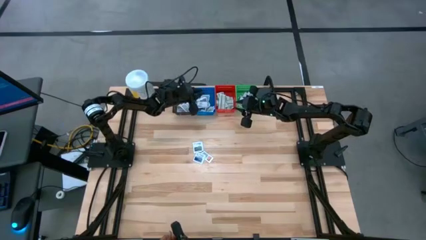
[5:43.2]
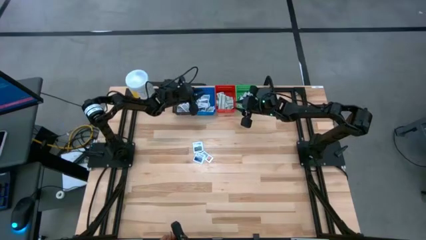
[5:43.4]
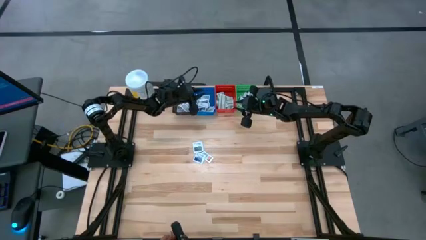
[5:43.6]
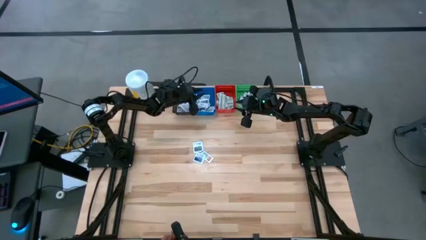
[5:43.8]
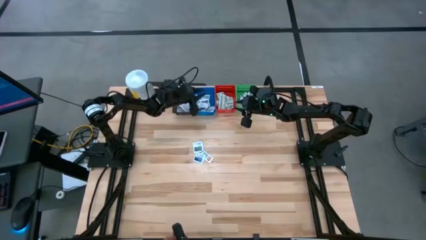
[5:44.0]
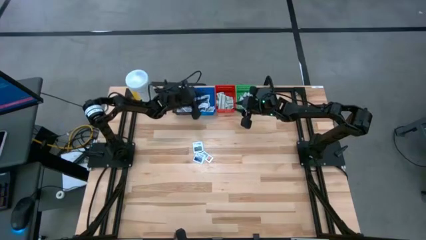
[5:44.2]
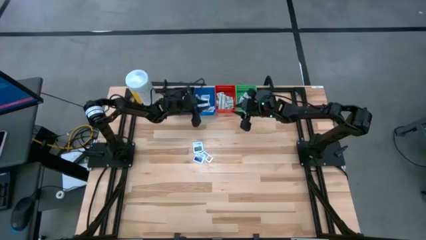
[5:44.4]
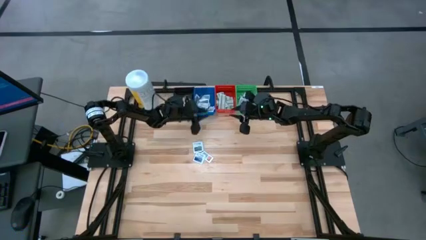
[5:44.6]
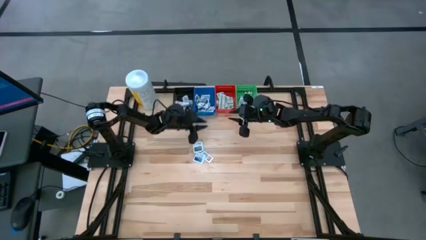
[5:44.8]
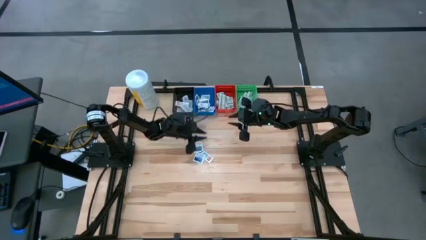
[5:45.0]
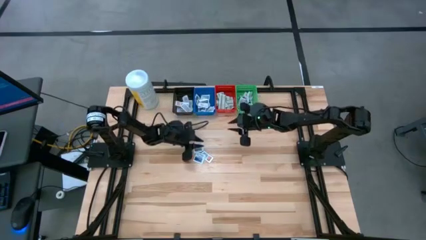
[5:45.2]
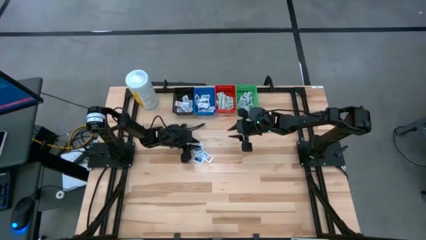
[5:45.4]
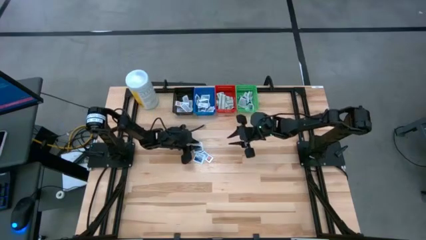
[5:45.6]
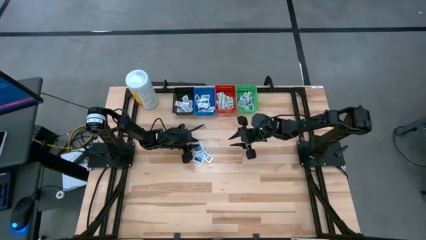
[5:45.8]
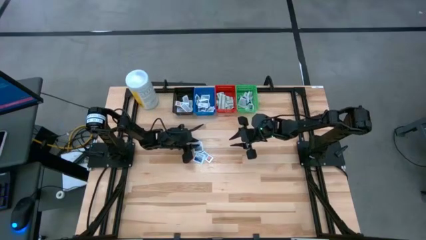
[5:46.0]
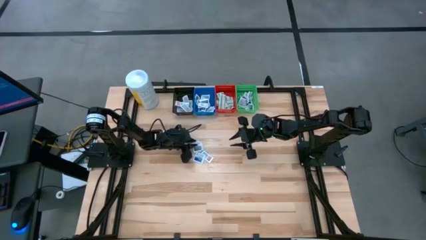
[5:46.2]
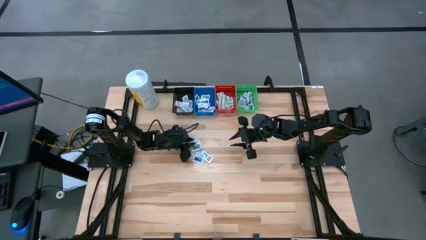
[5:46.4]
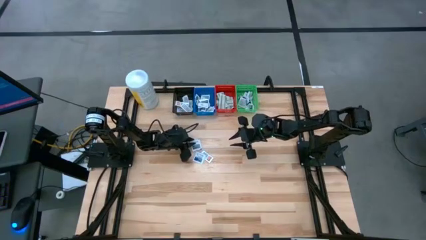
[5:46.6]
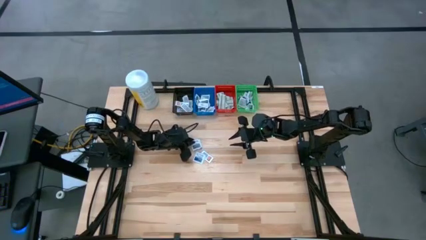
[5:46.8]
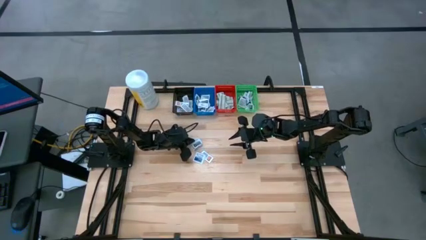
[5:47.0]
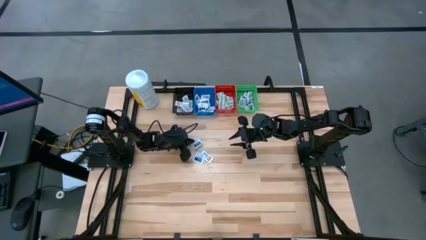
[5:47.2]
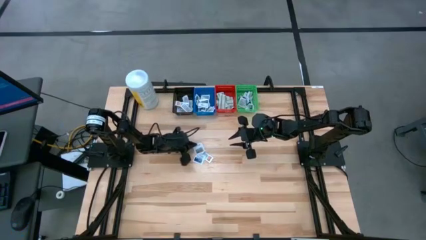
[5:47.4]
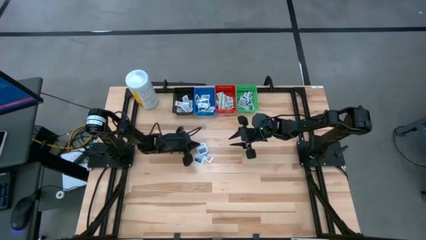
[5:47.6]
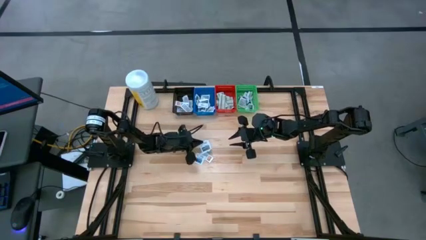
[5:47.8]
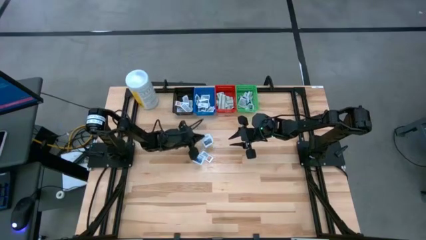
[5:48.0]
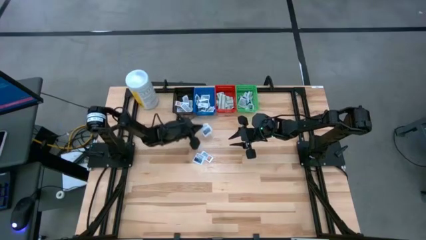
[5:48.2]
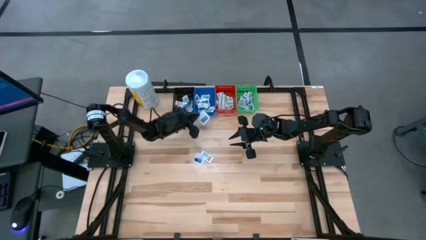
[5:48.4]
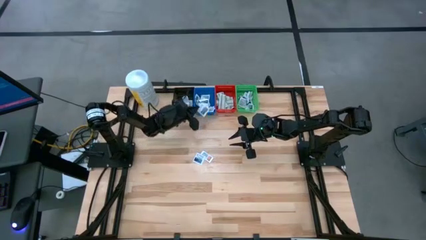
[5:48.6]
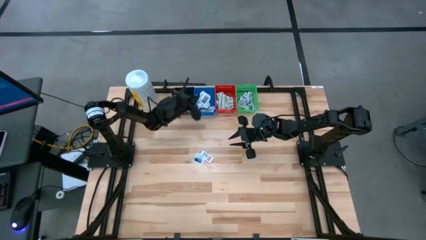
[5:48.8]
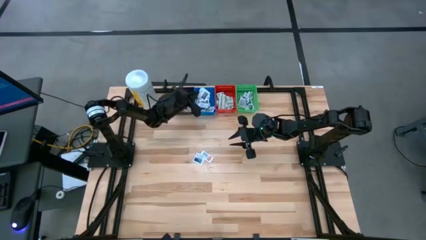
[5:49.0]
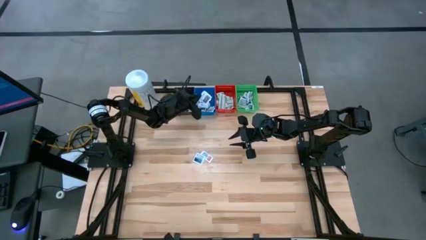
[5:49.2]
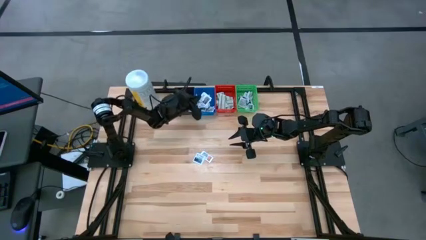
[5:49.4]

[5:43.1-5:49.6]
Task: Pick & Place First Aid Supplies
Put the gray towelette pack into the blue bin

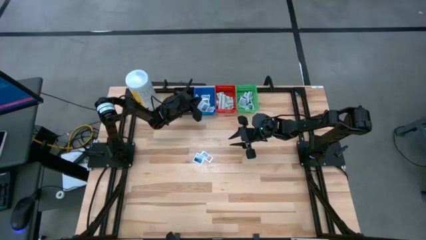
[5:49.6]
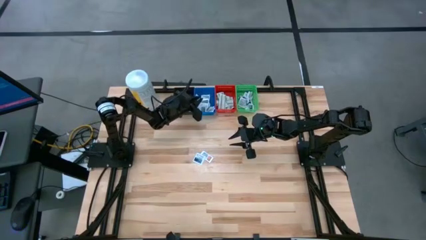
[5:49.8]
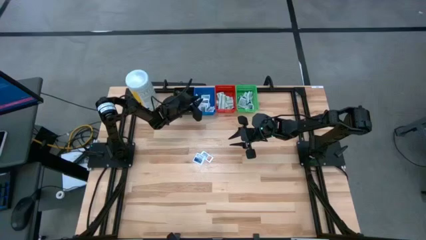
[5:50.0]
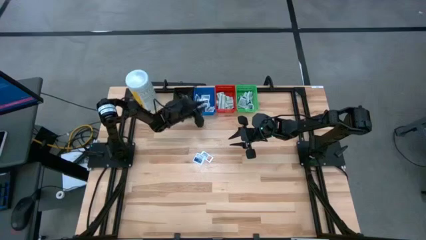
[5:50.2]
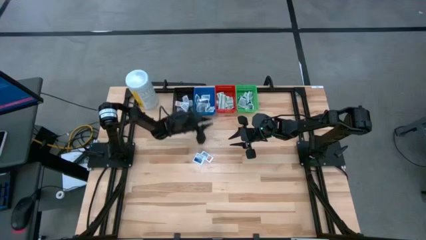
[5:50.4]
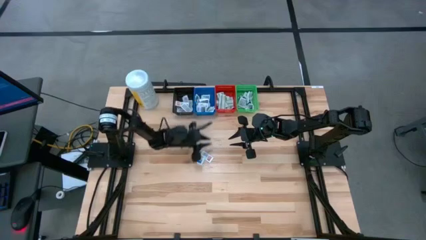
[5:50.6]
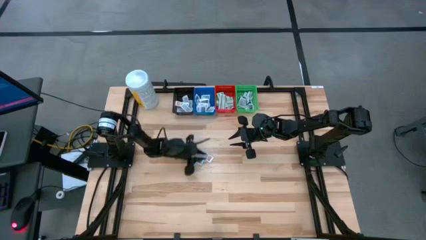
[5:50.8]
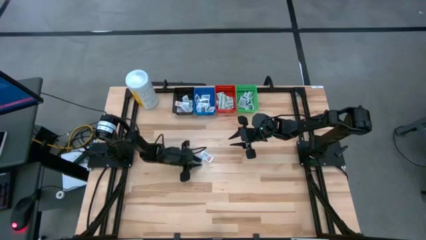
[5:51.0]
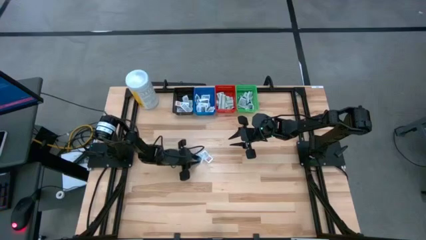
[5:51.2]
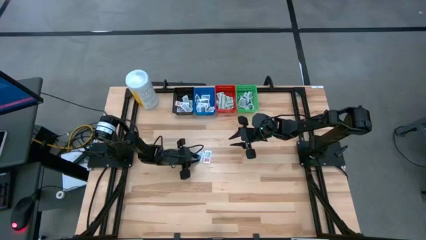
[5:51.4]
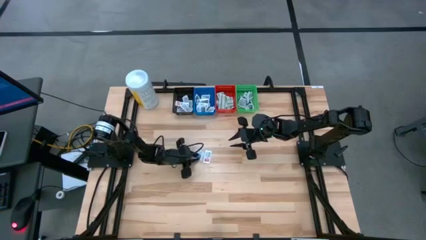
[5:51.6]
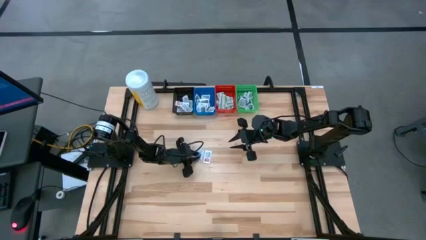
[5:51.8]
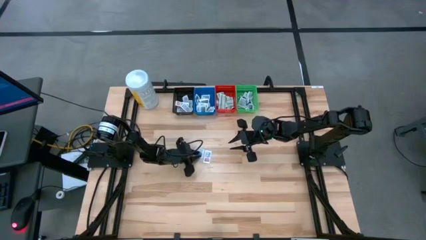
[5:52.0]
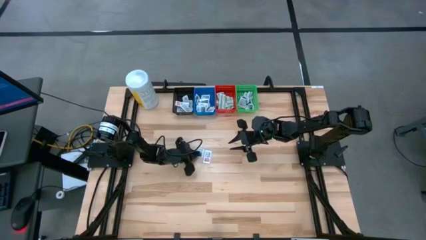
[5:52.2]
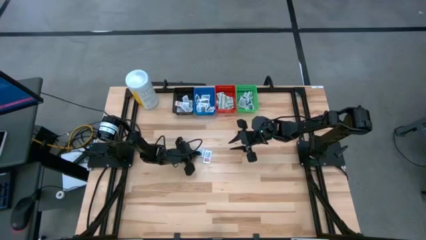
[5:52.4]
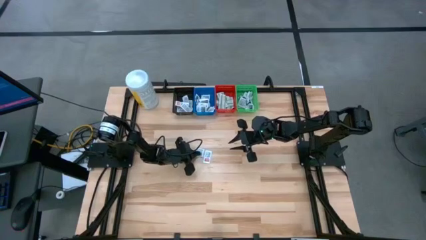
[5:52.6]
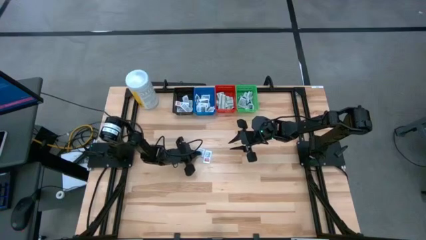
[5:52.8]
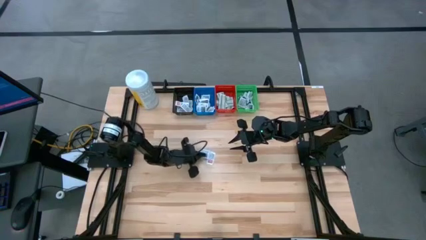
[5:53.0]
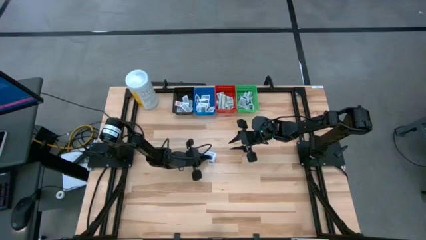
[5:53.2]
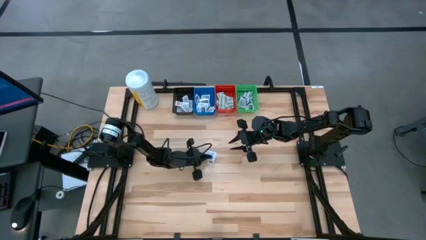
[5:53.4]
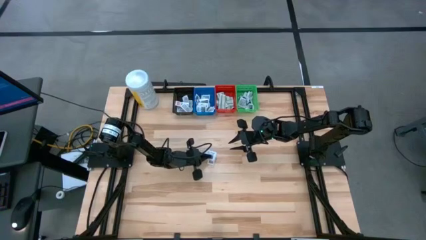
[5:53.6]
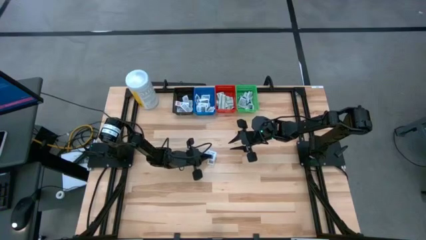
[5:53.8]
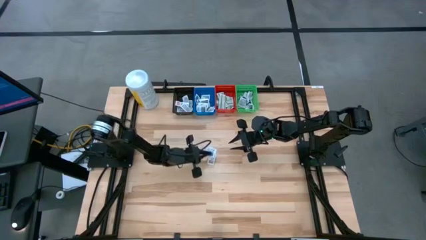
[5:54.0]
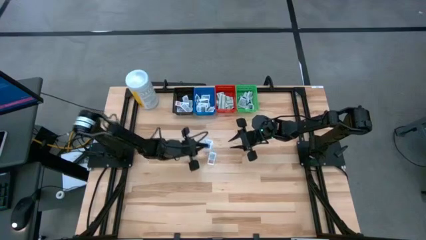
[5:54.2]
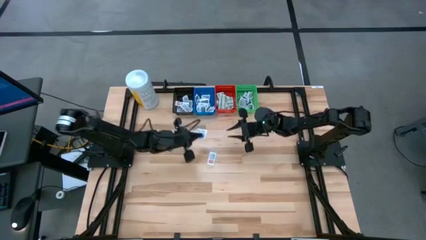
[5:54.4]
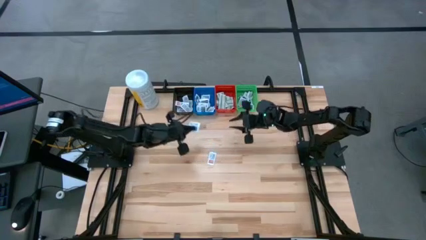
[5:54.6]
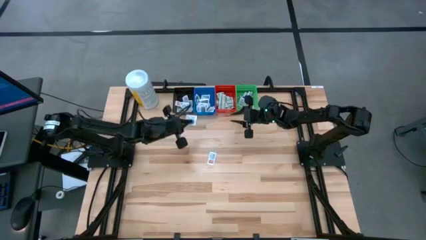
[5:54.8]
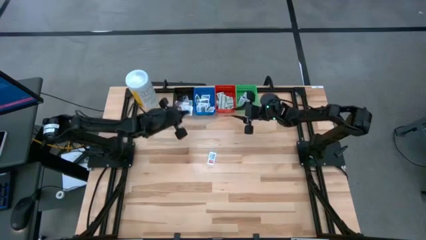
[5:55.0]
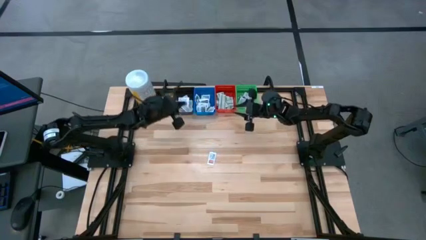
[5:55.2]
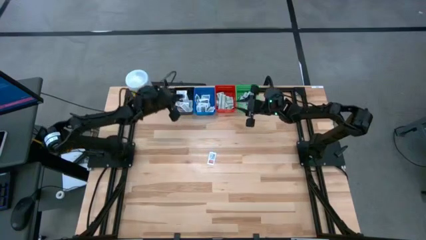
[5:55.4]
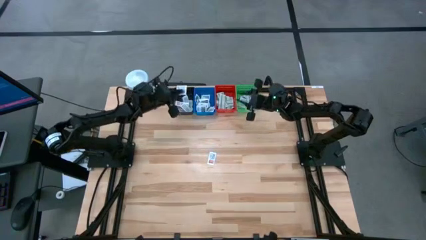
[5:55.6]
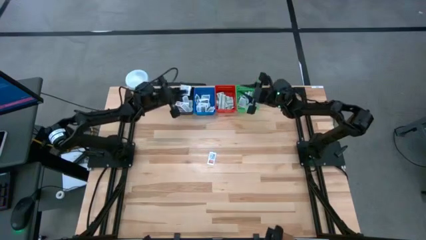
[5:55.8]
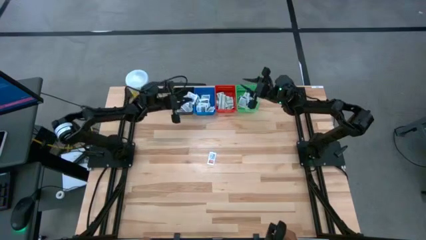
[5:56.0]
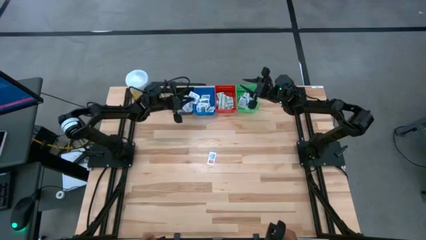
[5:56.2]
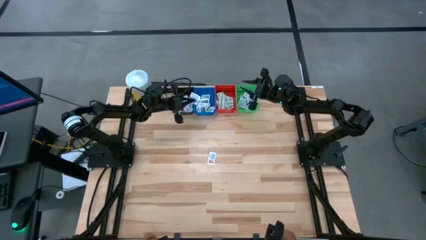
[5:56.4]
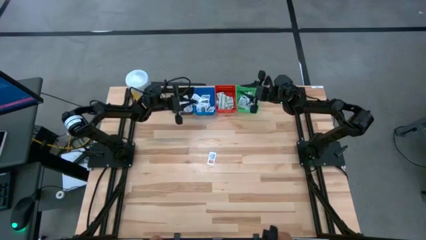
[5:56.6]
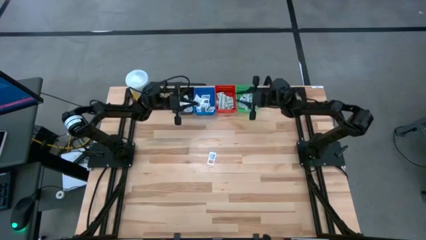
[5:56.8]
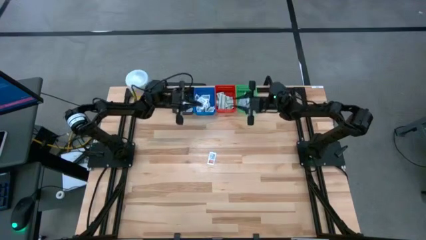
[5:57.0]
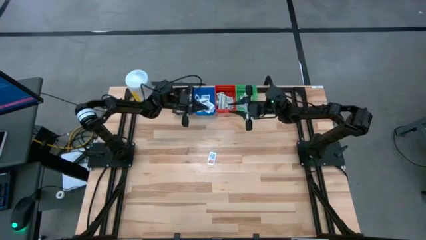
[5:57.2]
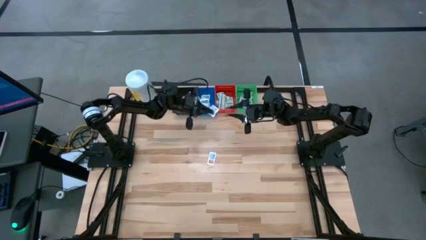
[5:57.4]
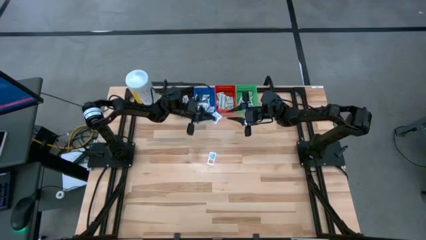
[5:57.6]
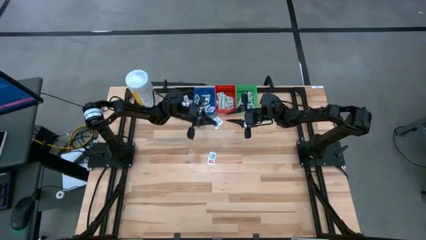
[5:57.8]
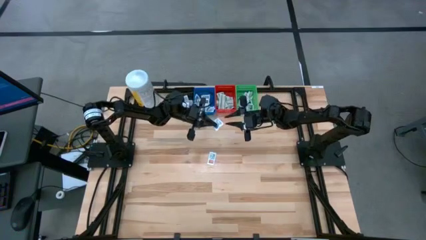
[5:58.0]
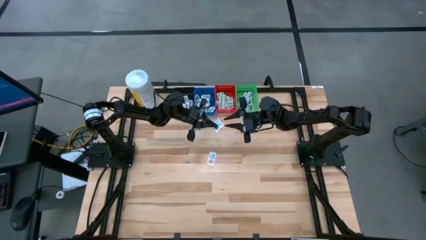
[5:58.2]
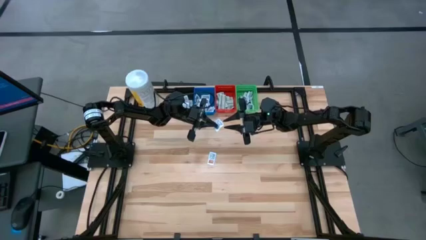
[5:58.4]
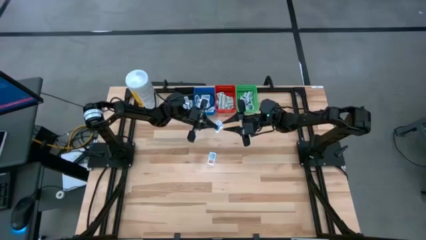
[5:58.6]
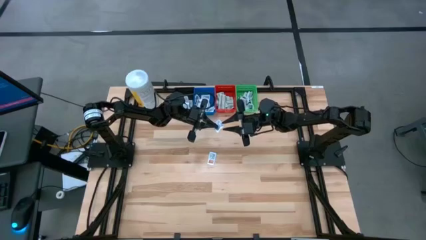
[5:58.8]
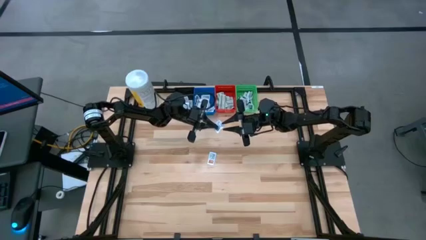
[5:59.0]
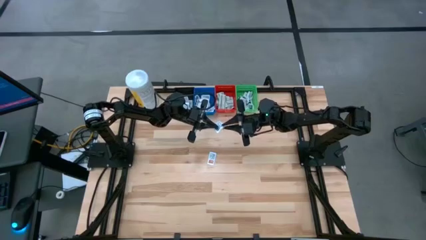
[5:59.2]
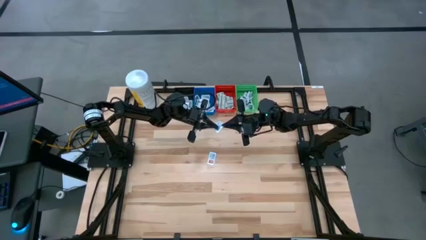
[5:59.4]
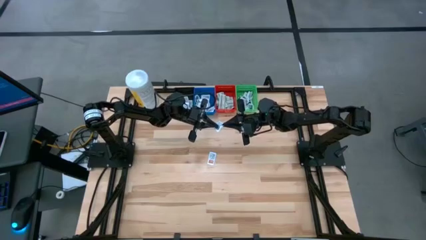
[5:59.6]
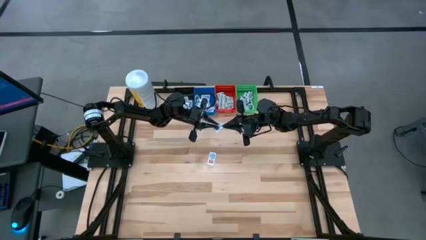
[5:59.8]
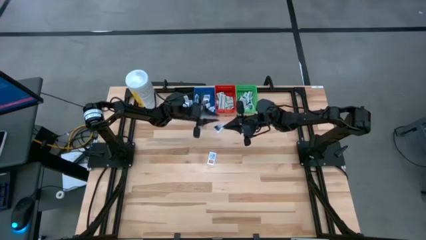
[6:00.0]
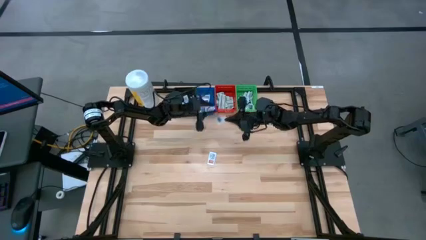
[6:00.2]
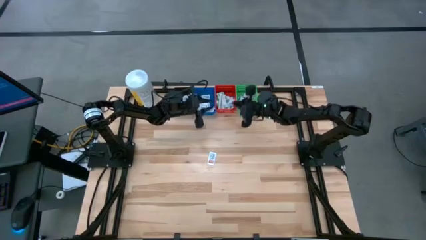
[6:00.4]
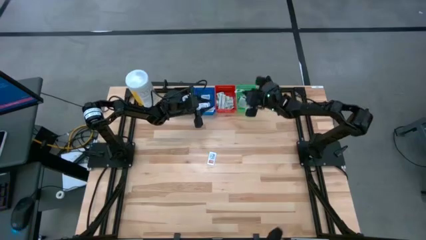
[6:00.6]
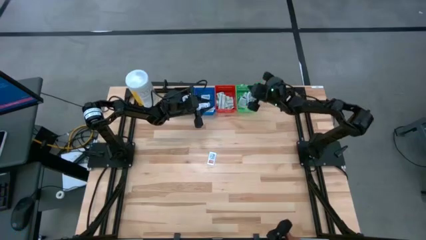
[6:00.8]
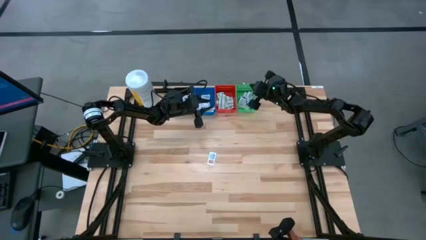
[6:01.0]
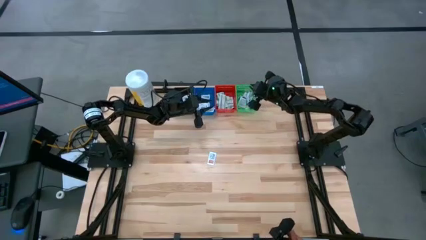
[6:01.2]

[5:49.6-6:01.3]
Put the blue alcohol pad into the green bin
